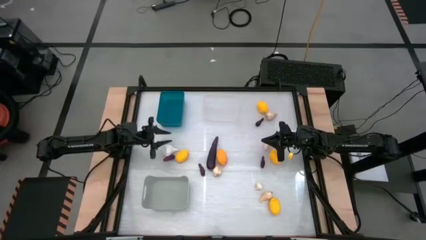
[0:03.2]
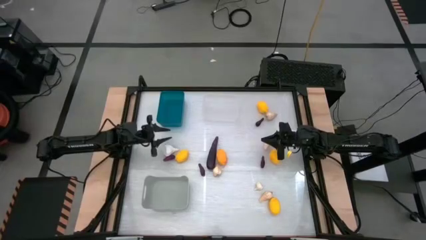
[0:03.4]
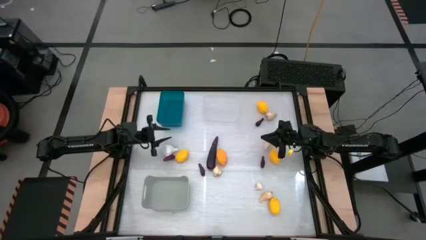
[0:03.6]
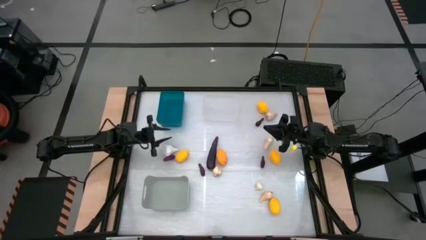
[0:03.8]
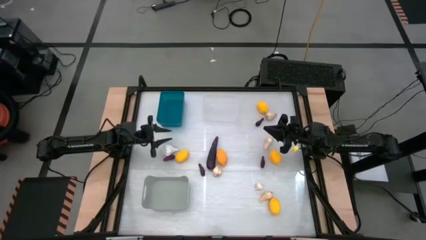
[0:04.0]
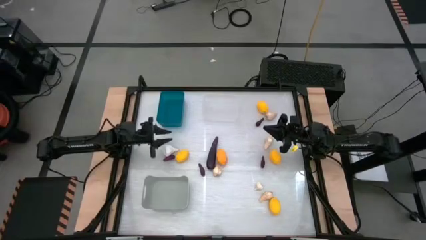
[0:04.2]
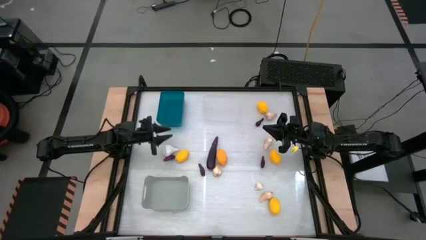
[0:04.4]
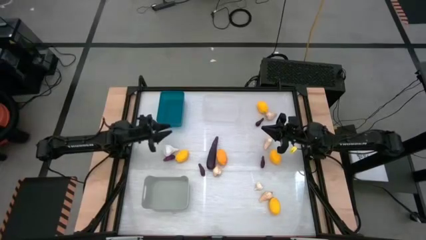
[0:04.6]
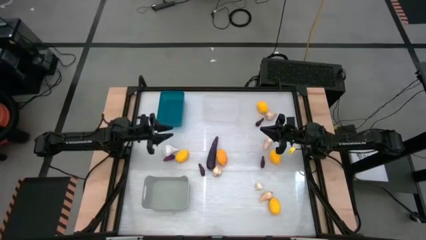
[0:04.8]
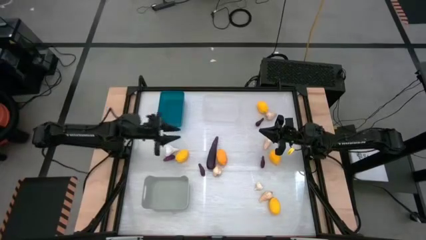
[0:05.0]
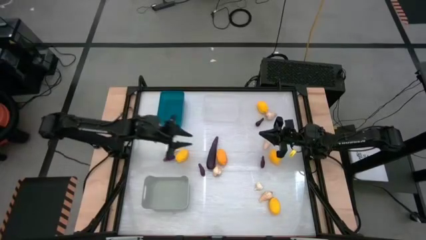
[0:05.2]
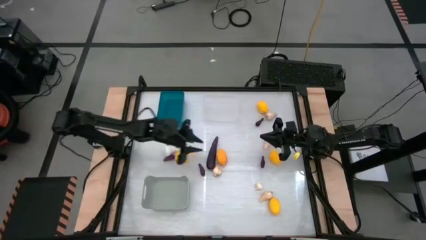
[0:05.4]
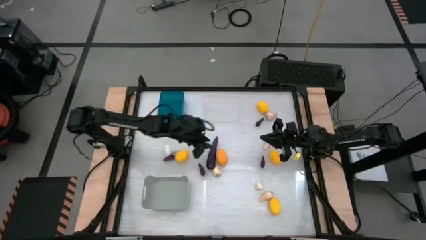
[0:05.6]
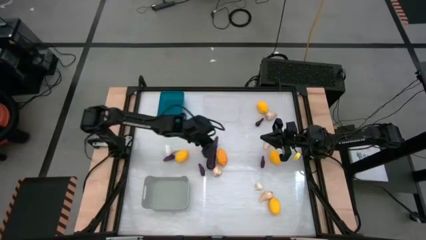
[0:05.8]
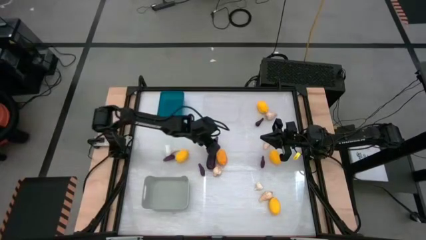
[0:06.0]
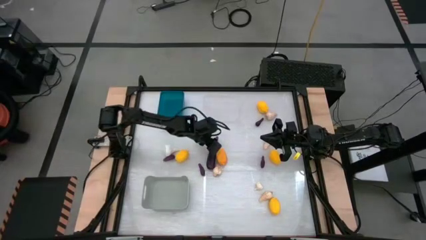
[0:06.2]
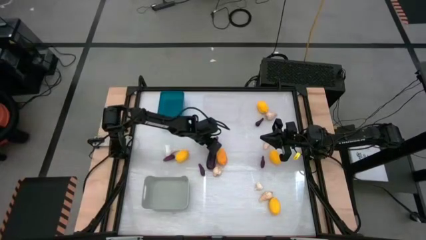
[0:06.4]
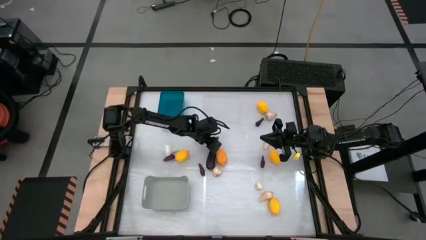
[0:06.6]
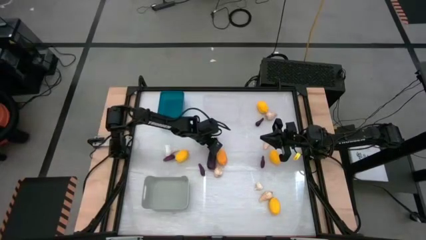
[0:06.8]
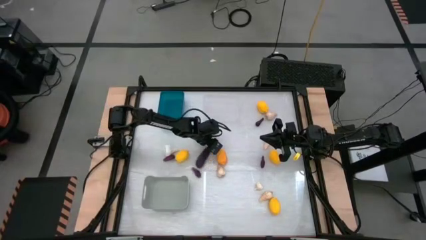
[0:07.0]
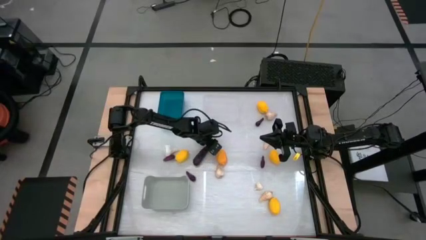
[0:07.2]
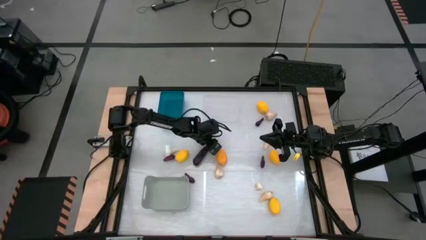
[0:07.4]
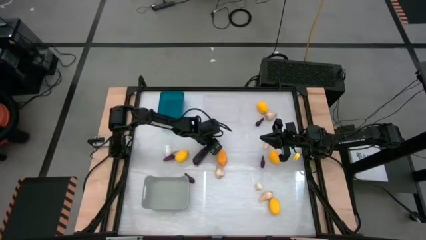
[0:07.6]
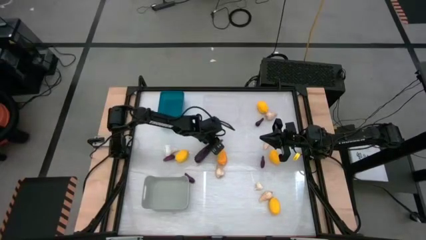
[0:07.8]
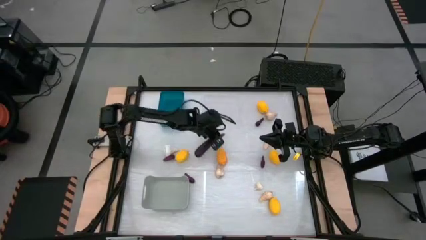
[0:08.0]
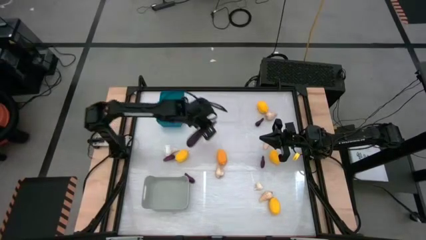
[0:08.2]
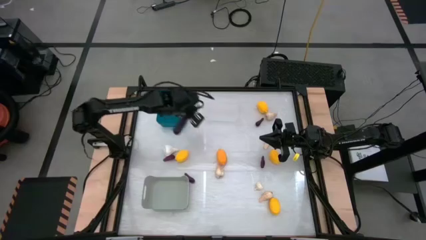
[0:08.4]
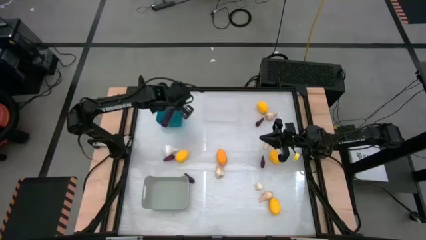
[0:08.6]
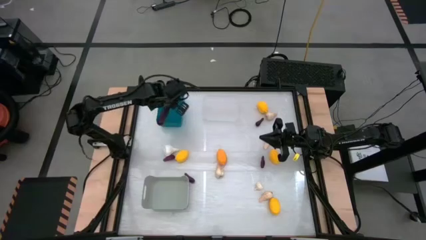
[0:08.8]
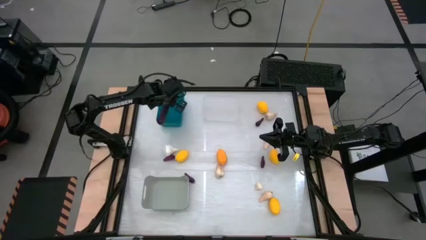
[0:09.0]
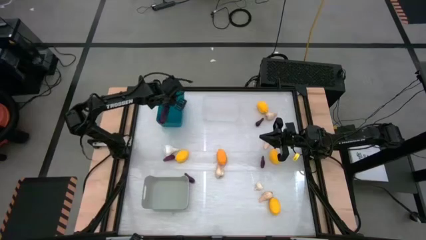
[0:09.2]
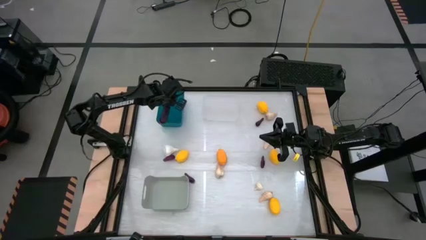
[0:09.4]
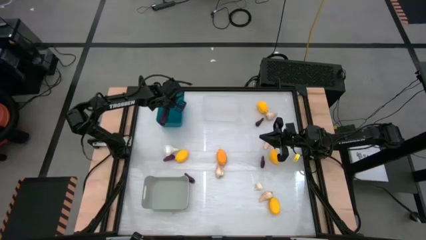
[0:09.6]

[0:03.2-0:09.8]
Task: Sort produce into baskets
Put the eggplant into the blue bin

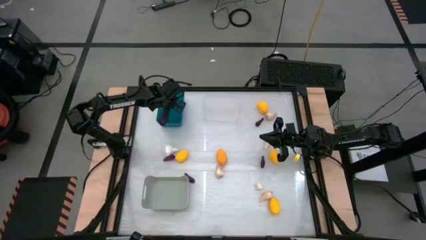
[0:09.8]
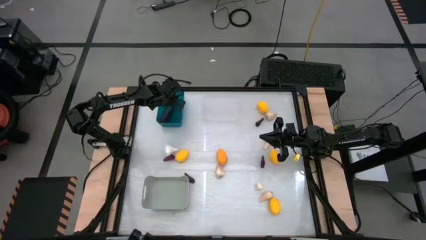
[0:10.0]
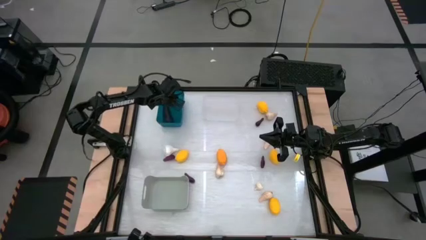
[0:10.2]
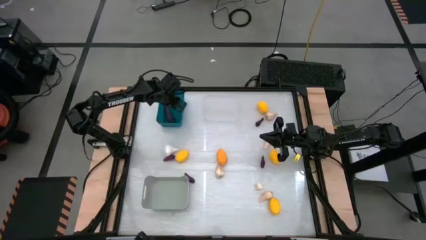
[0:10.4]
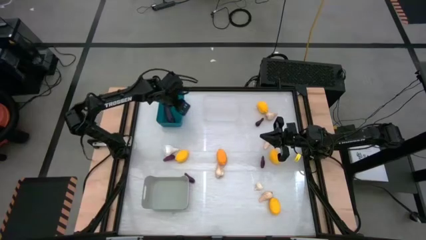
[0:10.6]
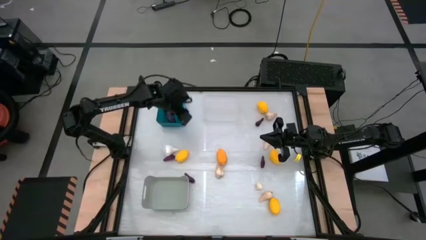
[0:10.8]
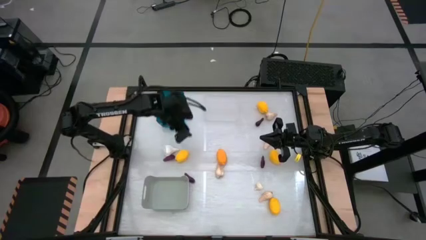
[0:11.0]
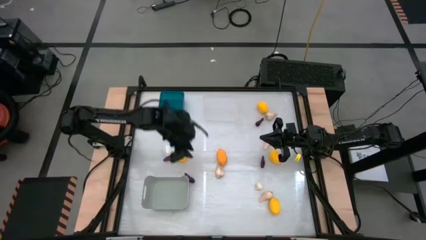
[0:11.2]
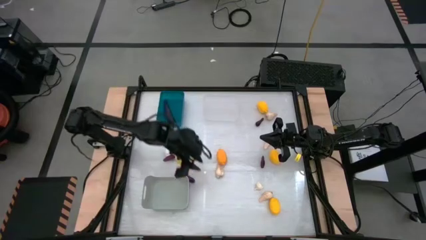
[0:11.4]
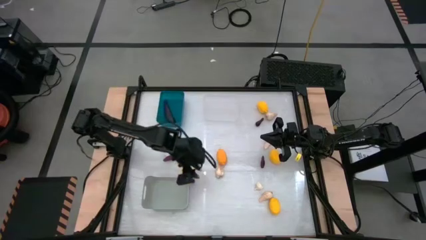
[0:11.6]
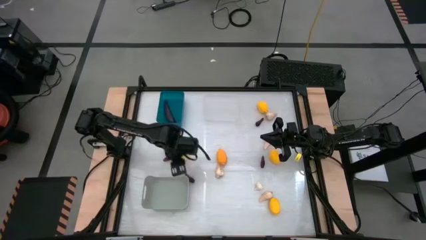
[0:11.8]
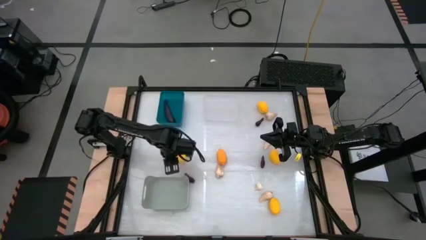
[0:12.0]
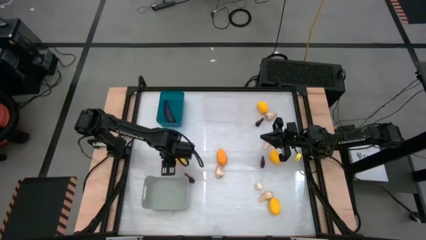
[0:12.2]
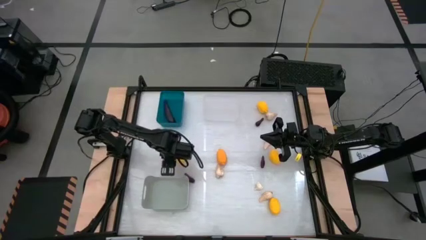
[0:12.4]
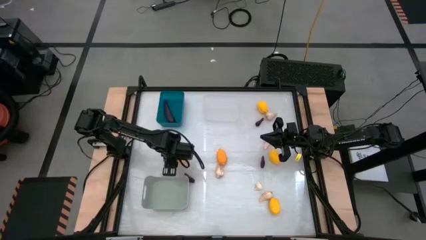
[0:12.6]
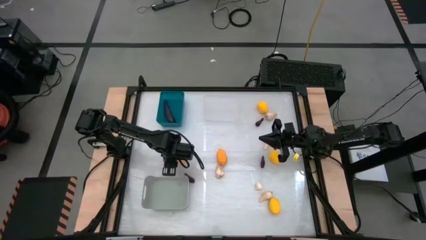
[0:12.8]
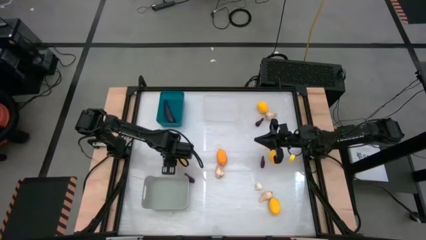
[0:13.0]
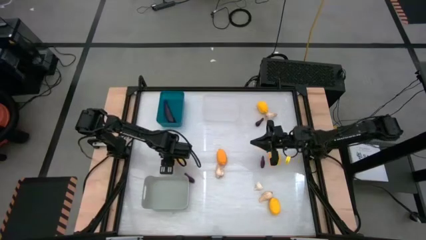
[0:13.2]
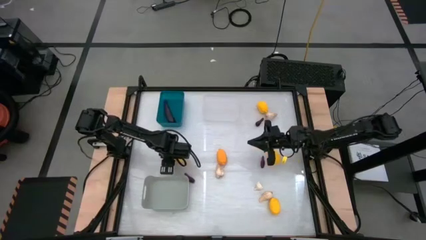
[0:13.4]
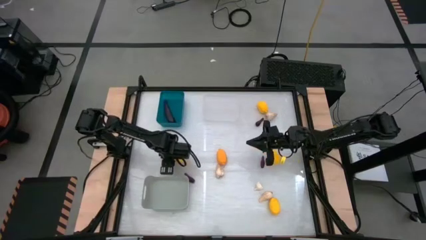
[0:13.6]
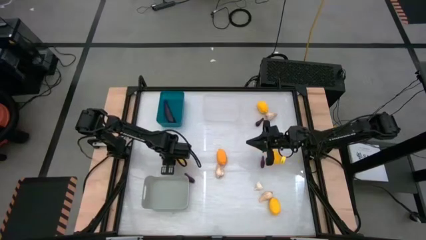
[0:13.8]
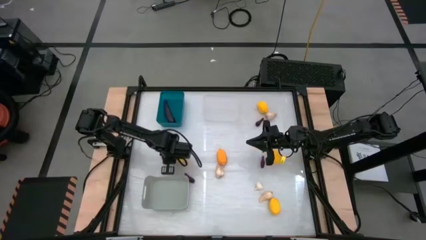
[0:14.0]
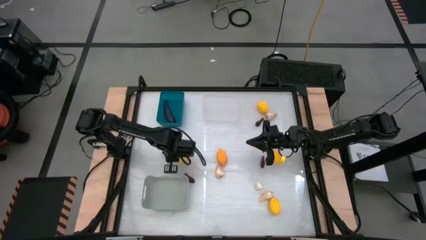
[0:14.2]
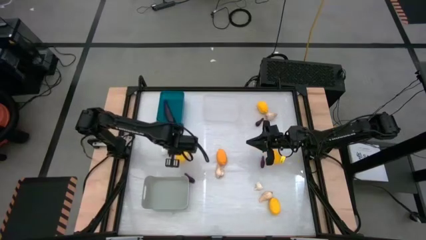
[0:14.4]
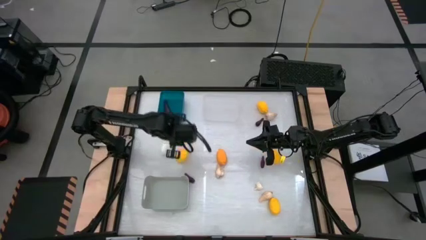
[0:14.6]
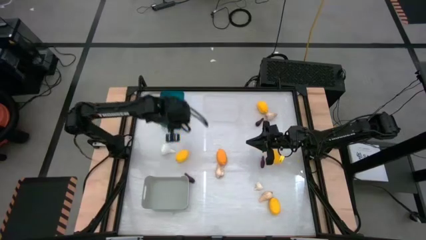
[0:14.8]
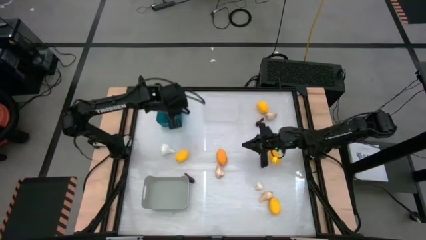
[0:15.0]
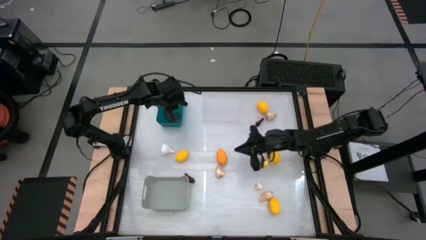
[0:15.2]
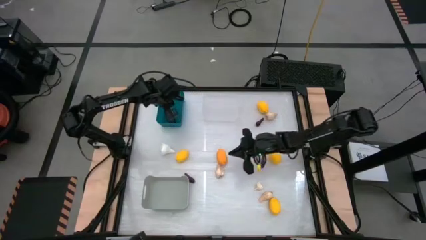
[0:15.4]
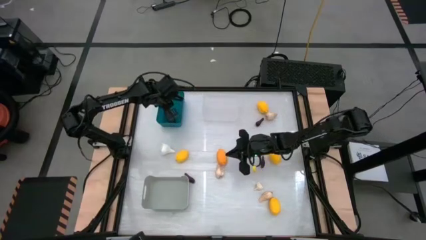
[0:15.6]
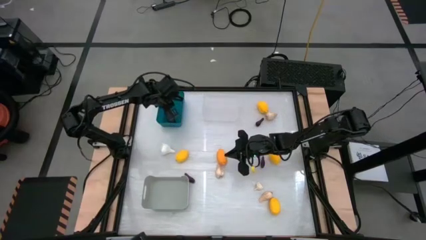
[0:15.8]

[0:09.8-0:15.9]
Put the eggplant into the blue bin

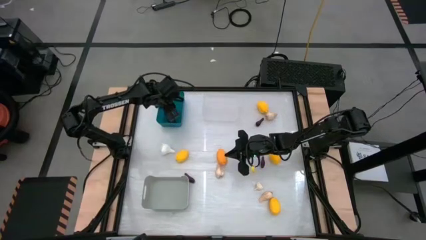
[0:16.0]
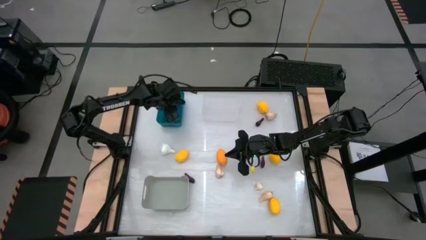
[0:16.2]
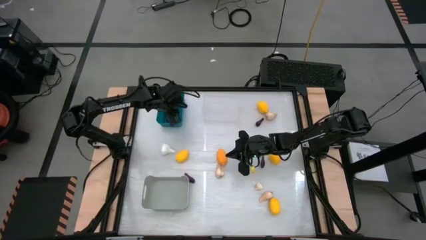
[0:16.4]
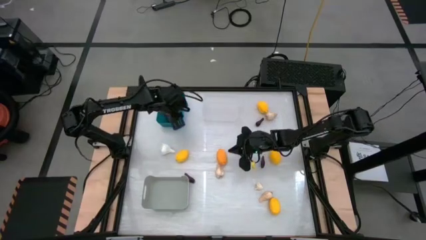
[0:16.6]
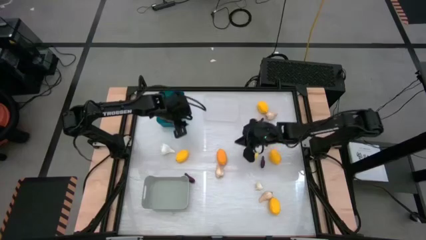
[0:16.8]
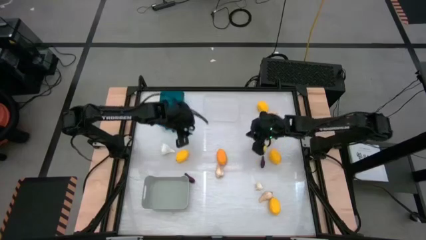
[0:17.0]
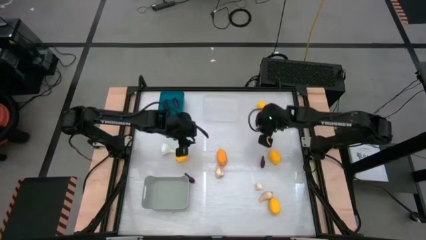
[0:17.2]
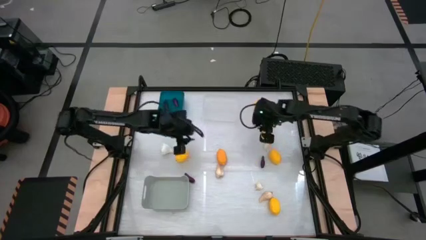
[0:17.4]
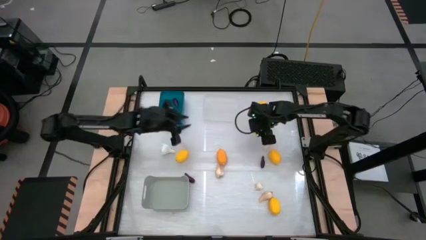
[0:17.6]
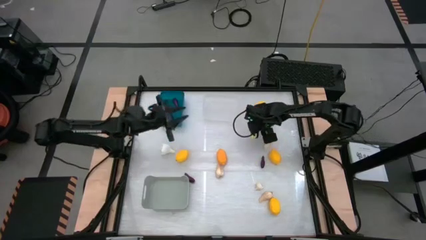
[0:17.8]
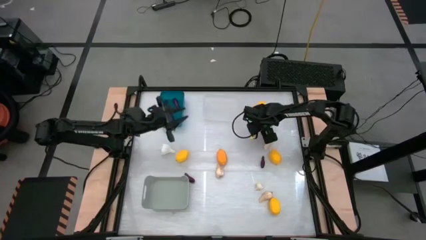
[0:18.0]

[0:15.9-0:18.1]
Put the eggplant into the blue bin

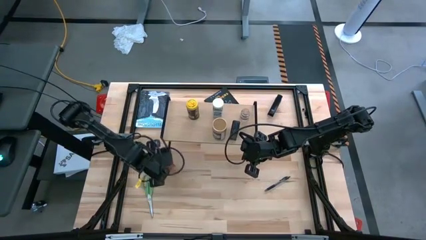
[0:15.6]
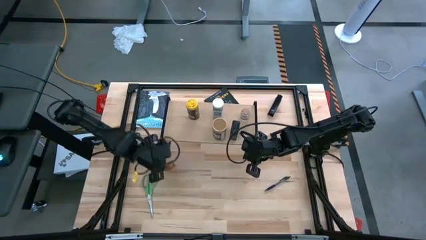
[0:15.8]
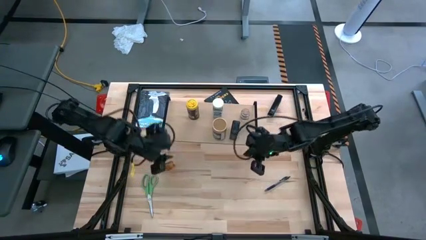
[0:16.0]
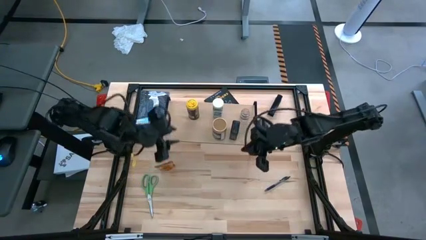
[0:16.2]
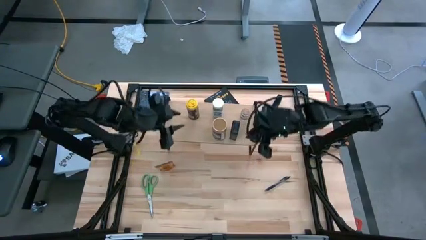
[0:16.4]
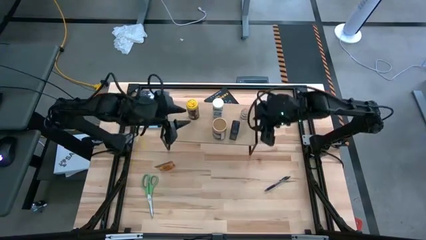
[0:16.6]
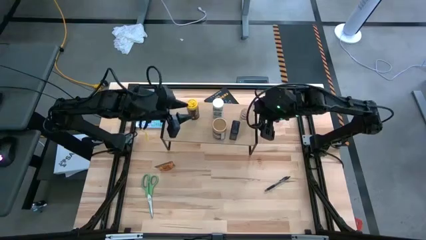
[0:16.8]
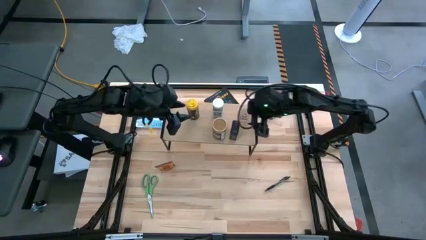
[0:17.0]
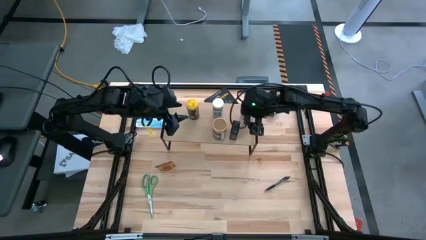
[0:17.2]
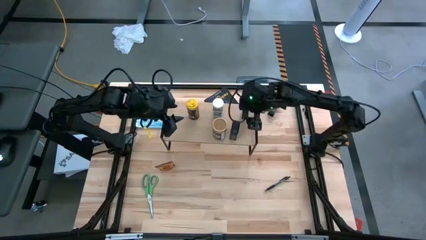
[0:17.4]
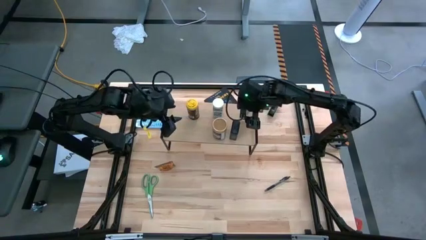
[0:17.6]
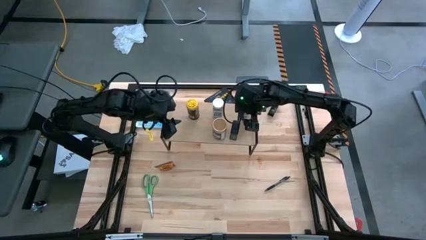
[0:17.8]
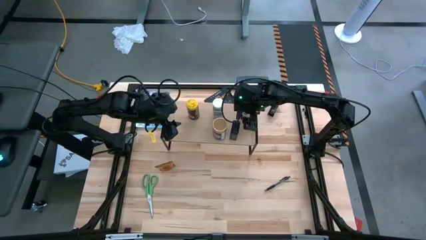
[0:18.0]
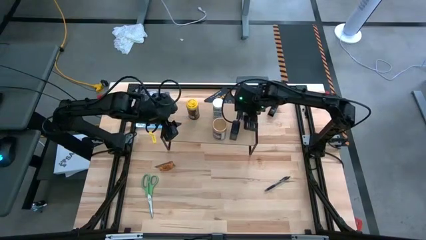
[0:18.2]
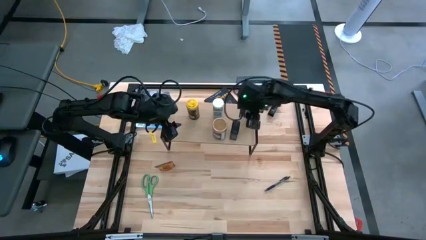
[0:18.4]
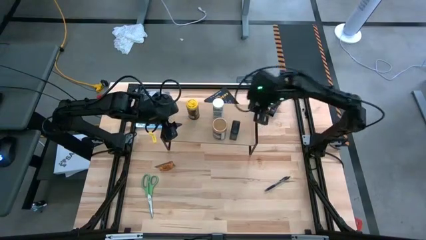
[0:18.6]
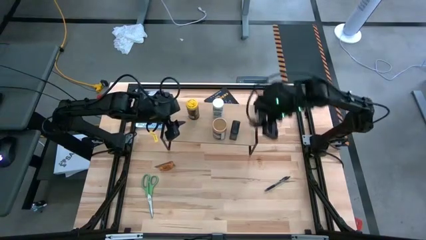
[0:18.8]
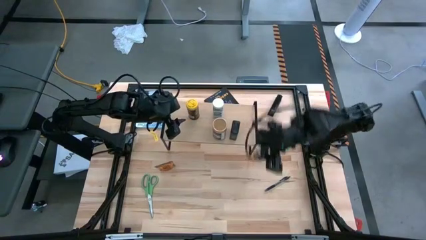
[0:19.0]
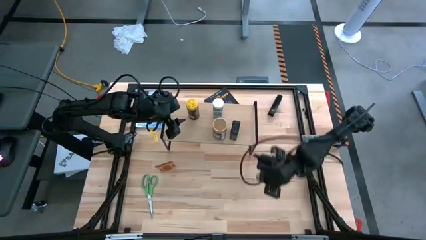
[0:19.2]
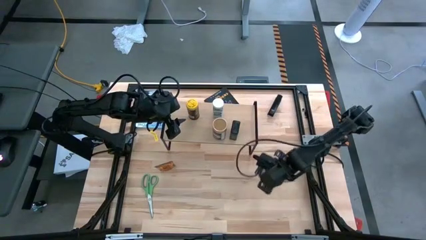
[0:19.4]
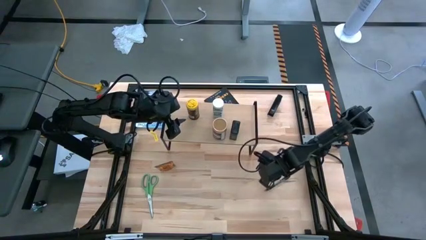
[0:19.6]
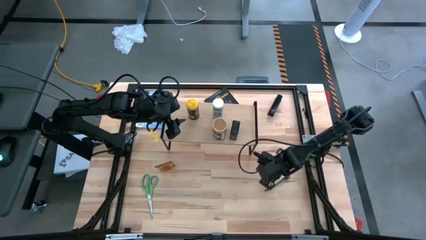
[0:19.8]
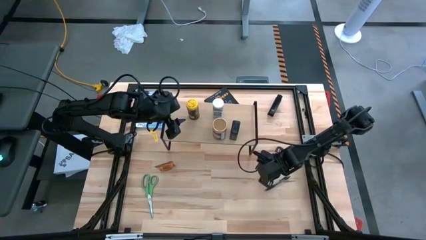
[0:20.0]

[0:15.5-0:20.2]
Task: Shelf spices
Remove the brown seasoning bottle from the shelf
